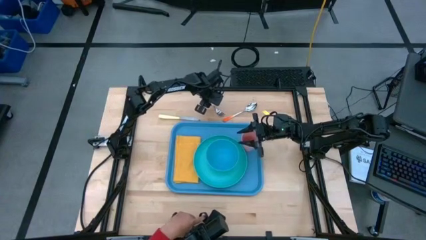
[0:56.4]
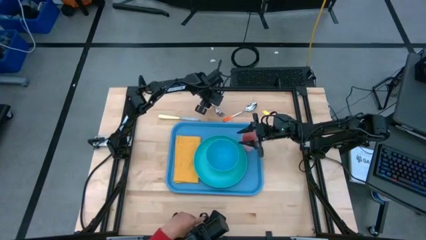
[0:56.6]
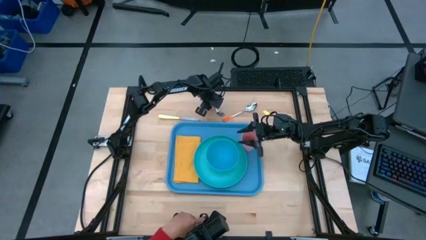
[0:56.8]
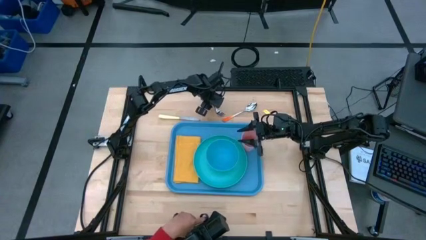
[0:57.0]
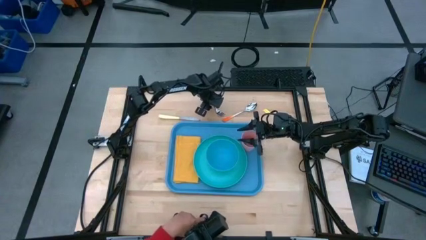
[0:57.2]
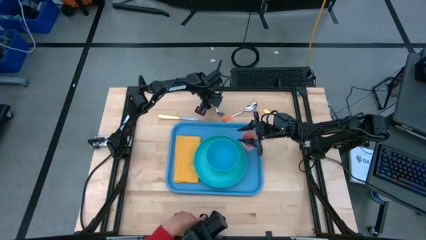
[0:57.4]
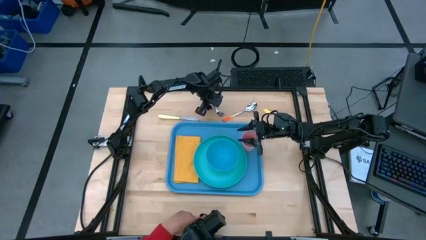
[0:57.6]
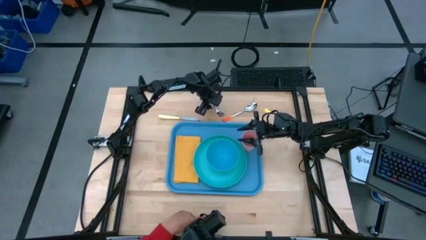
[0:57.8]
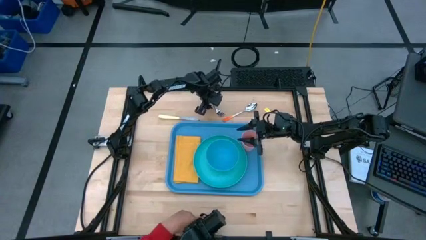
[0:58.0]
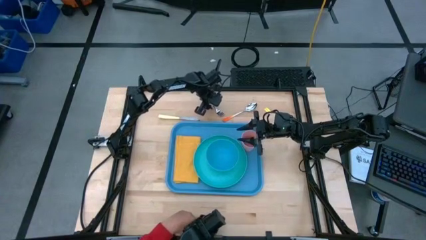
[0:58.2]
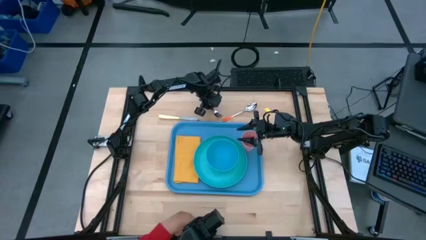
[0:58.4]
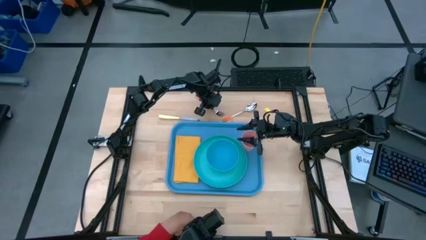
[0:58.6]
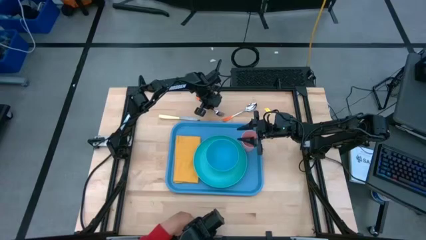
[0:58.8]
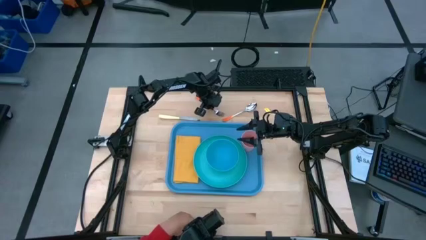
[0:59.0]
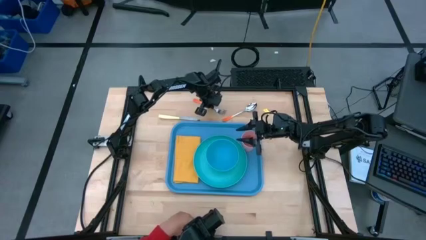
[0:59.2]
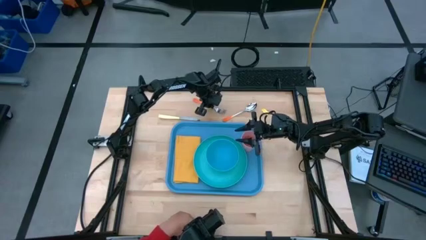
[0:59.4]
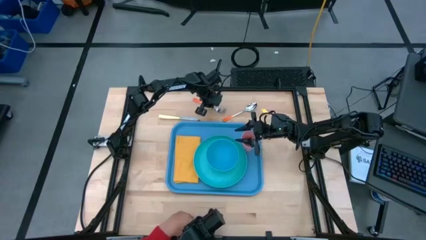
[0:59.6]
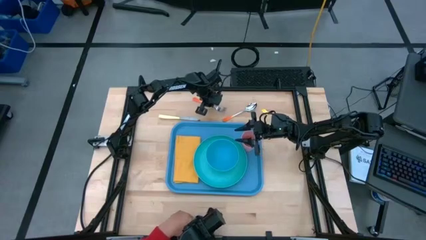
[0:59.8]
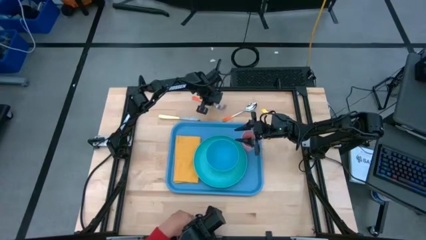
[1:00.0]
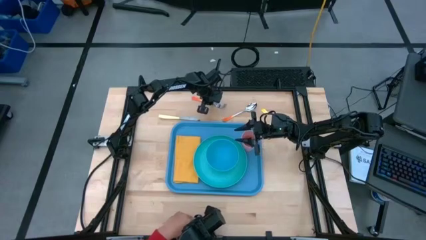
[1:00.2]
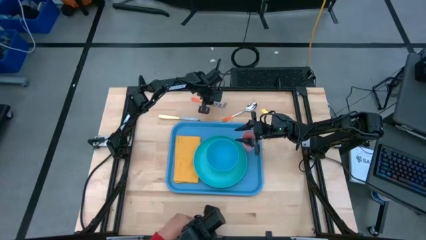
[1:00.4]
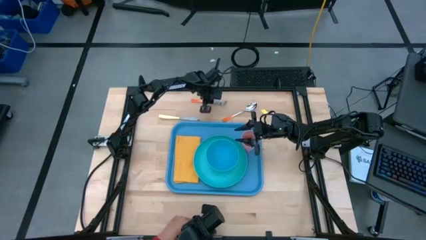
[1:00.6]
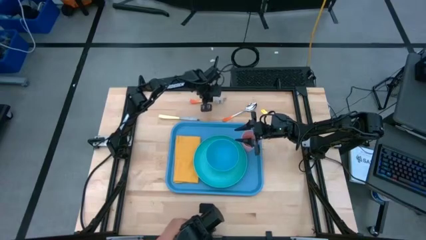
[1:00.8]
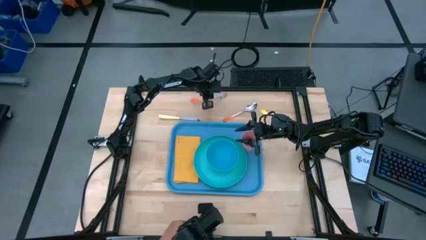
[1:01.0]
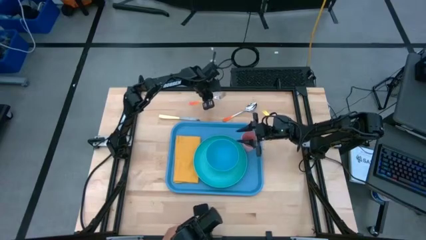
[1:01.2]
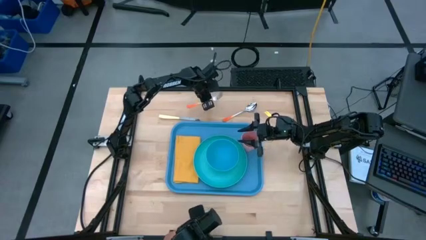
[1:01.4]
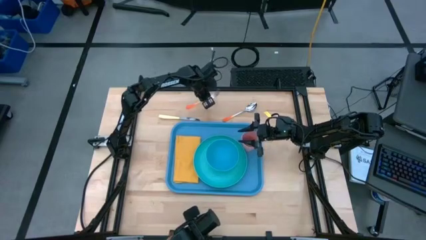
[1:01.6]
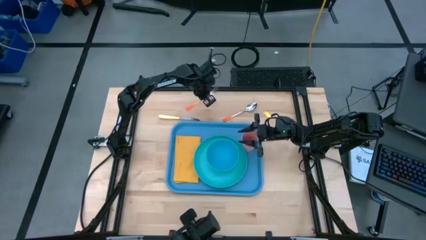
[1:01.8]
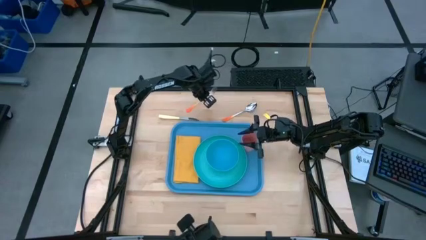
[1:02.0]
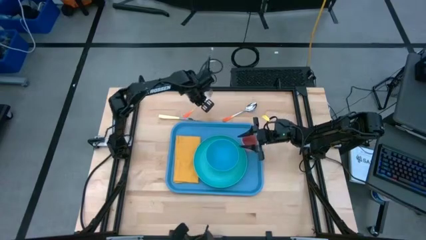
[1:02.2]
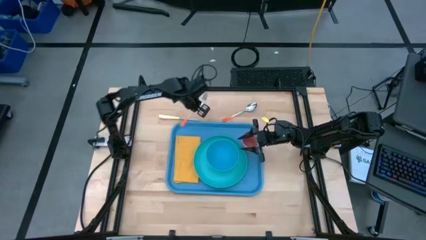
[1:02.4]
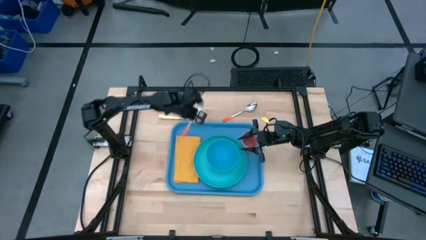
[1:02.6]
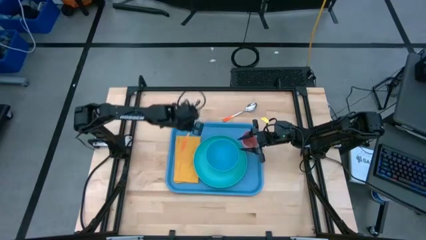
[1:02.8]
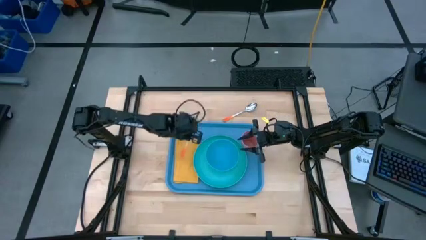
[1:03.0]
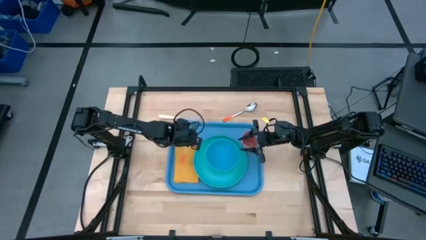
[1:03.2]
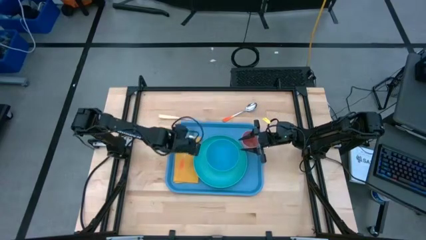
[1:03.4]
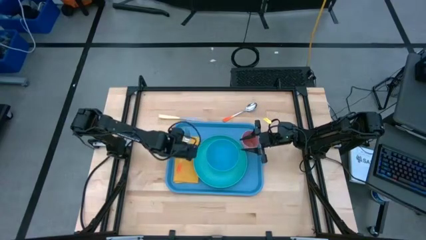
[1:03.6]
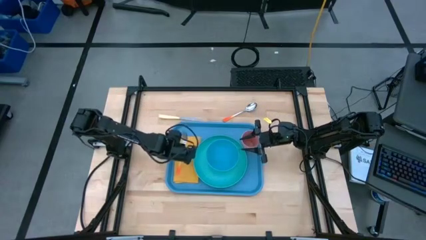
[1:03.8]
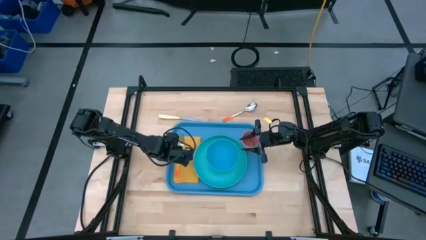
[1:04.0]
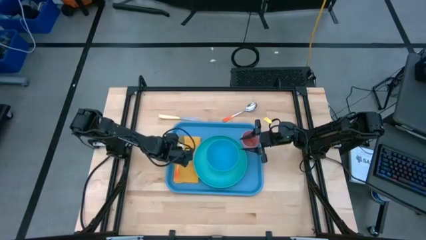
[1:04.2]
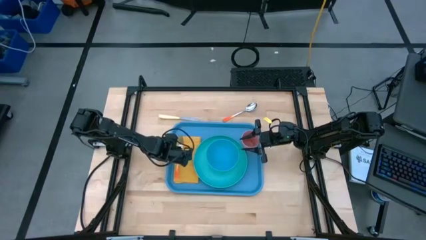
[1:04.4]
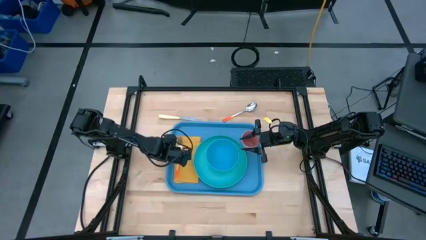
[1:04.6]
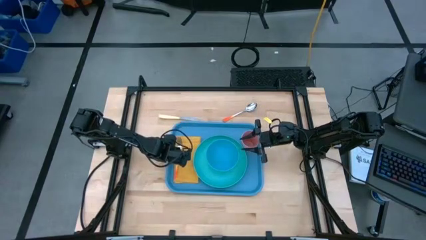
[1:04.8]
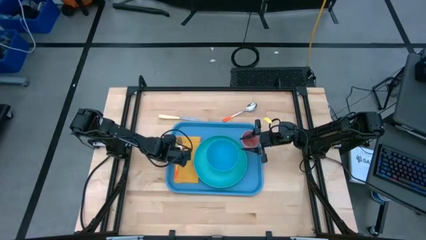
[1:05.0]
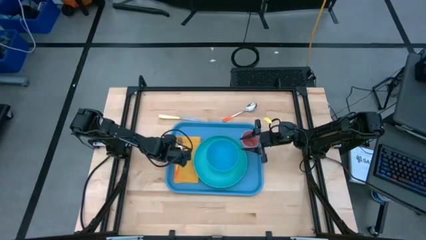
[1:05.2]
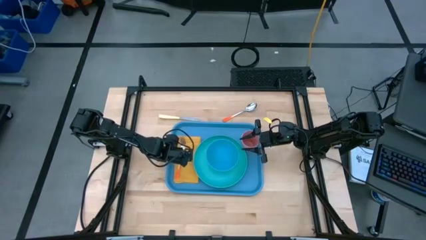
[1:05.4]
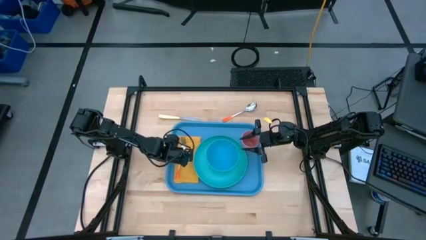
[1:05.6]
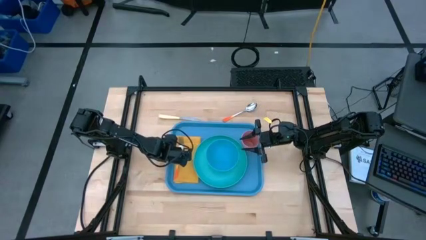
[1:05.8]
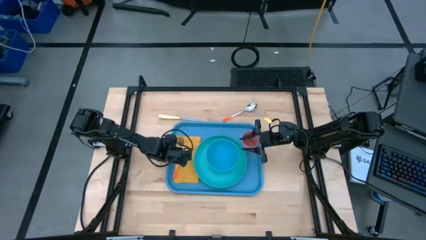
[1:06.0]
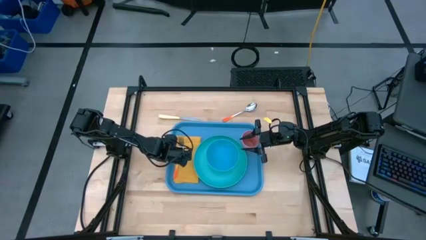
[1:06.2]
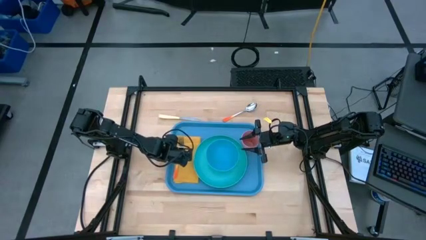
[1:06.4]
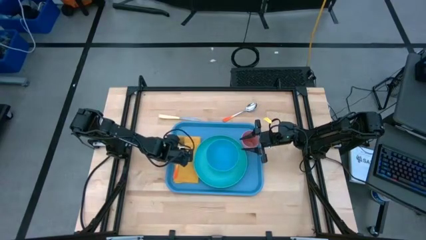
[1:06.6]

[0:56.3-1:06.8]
Task: Set up tray
Put the orange fork on the yellow napkin

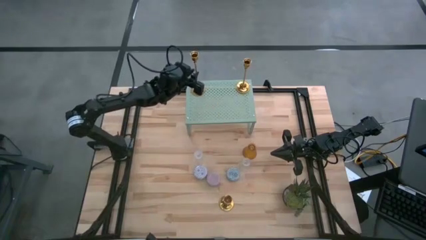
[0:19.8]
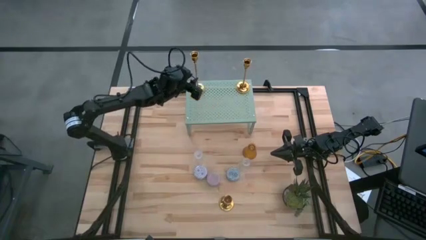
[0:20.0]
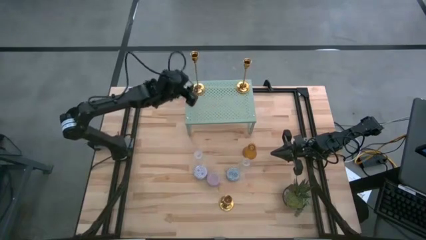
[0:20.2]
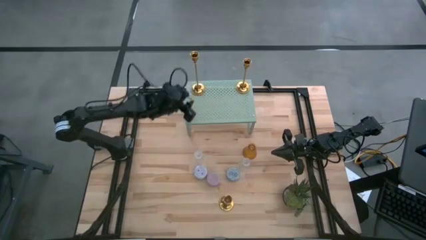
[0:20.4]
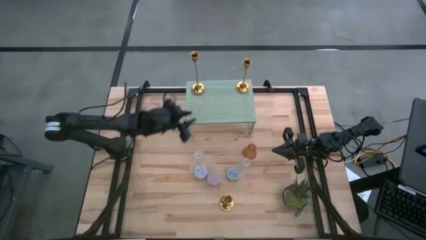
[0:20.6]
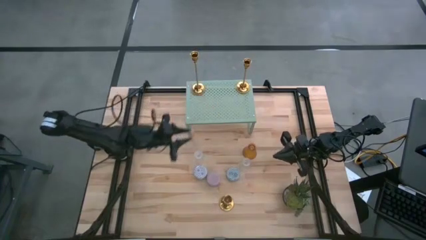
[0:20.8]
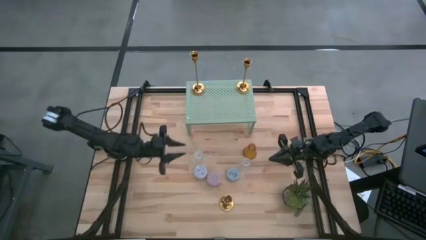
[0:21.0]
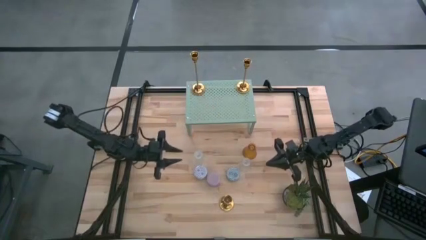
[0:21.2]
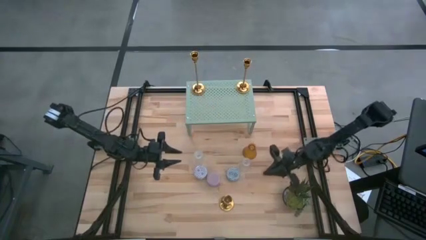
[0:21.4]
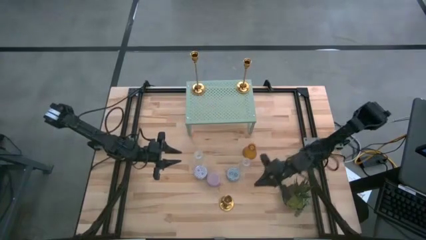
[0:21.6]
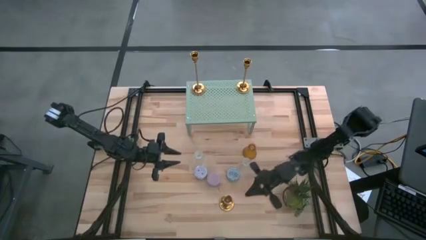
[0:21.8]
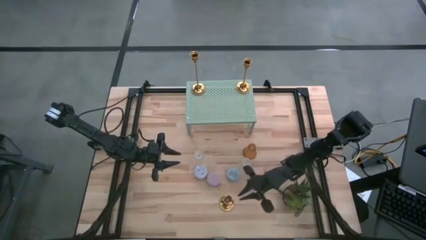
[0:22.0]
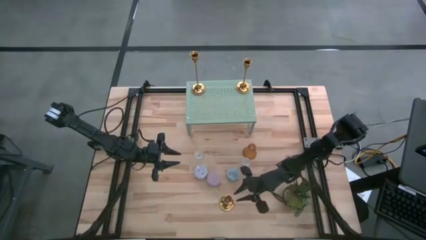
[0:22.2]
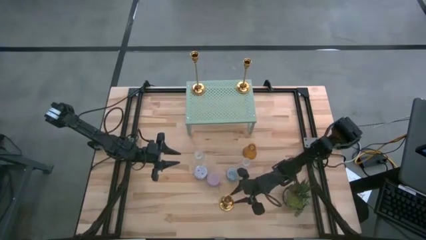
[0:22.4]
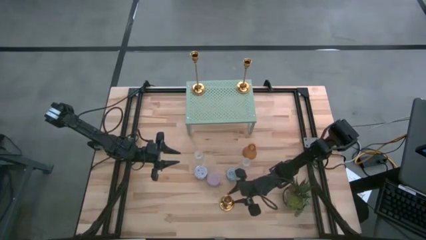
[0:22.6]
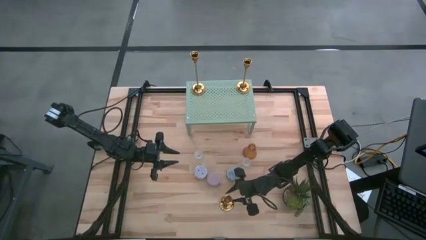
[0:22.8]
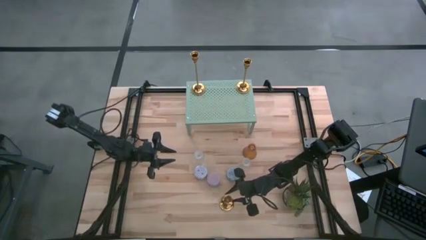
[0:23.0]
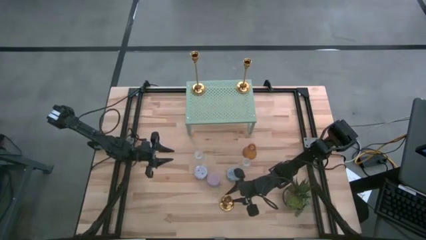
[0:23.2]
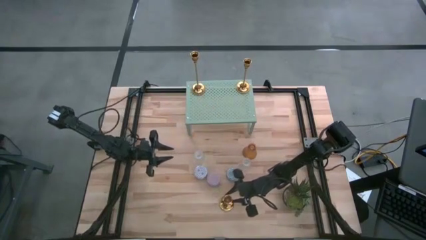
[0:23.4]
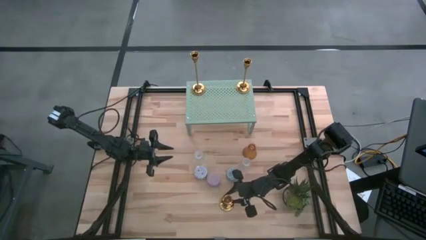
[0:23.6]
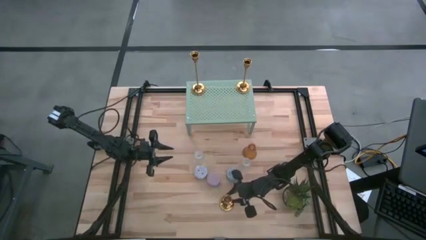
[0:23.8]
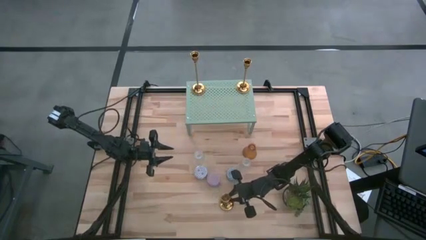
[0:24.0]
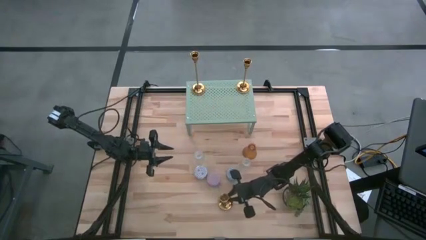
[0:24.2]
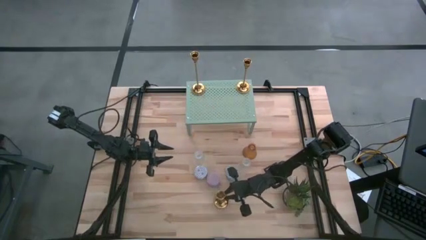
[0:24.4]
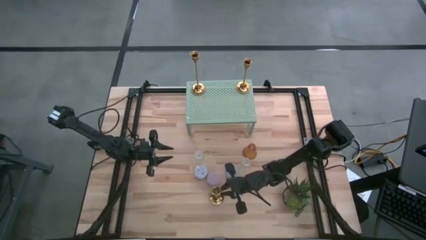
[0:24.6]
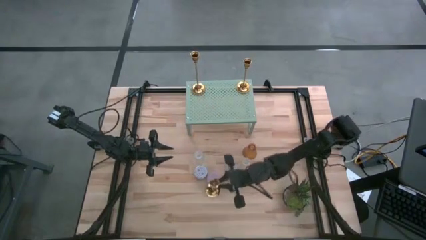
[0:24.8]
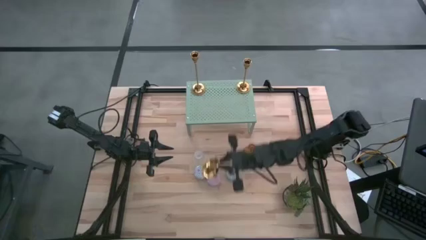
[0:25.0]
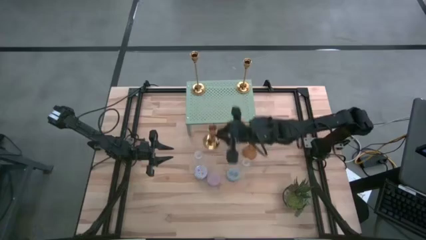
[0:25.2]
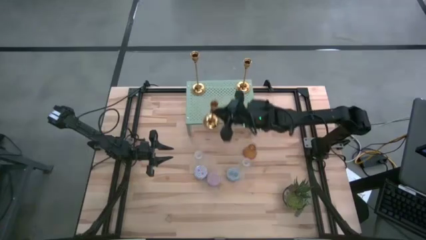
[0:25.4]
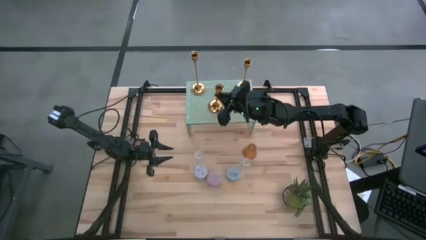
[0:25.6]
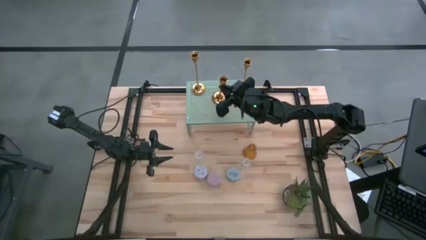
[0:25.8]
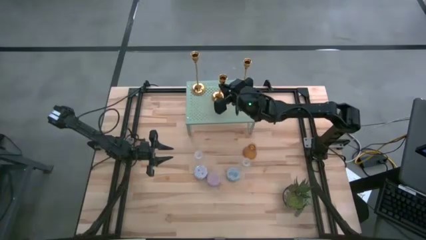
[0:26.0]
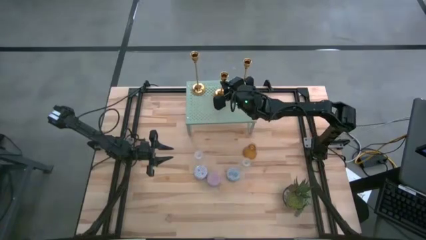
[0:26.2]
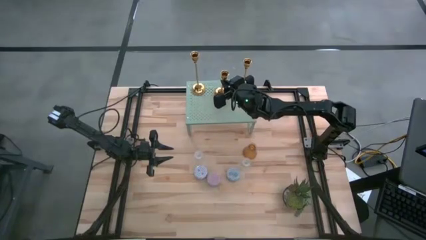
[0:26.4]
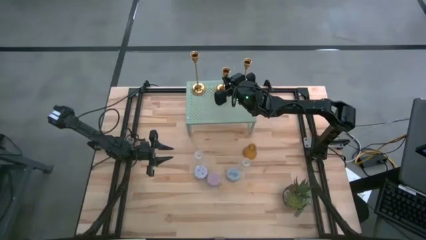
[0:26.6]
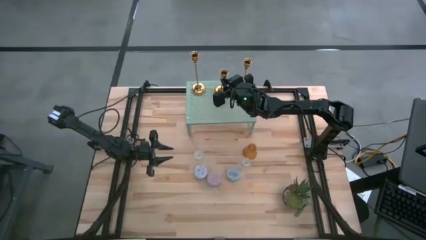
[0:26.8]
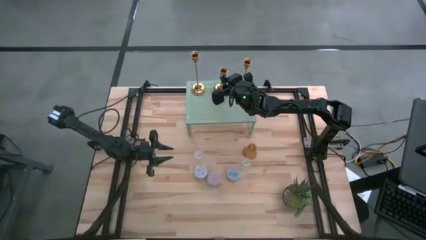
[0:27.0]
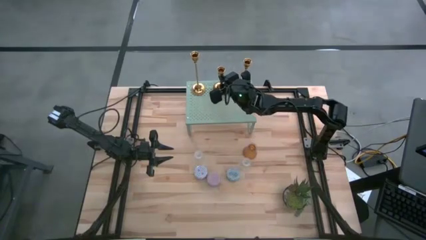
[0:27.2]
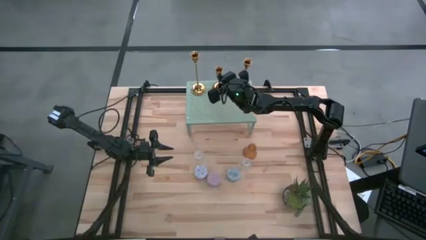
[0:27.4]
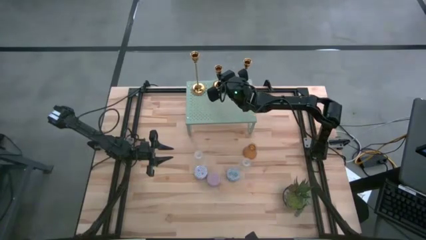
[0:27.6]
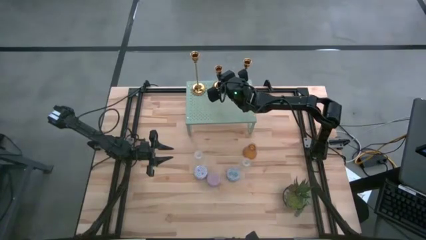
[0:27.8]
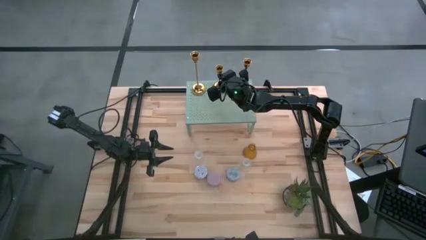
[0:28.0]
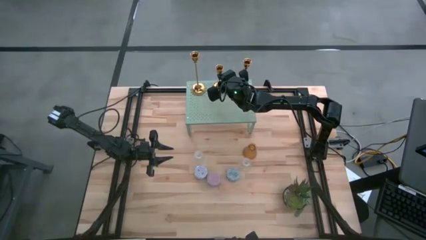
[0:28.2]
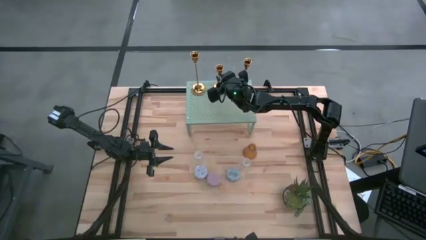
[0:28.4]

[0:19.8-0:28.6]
Task: Pick & Place candle stick holders
Put the gold candle holder on the shelf
